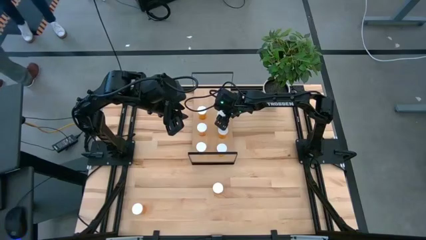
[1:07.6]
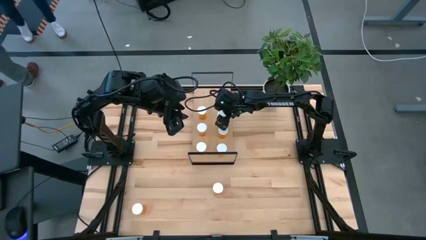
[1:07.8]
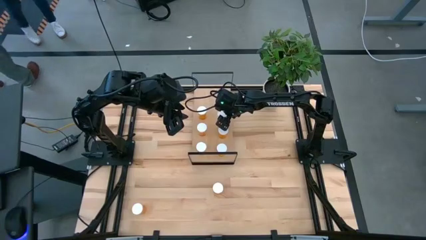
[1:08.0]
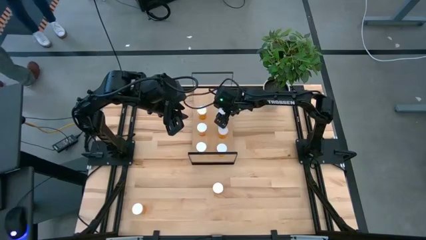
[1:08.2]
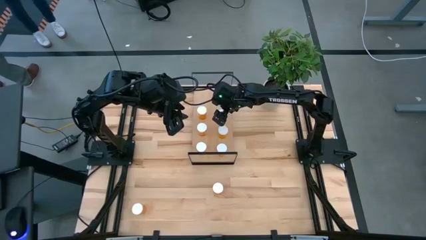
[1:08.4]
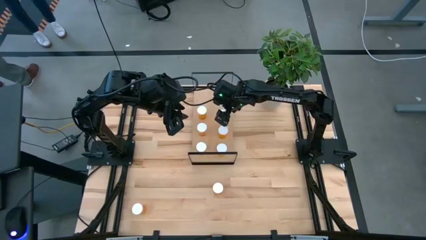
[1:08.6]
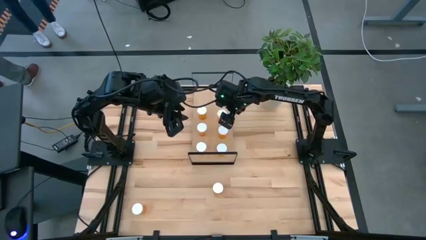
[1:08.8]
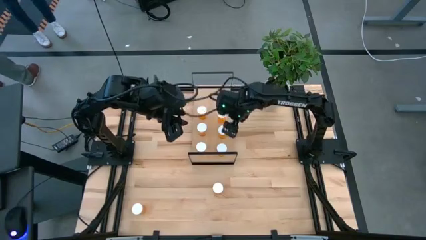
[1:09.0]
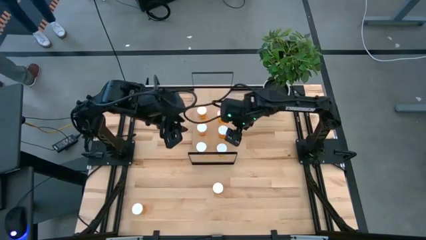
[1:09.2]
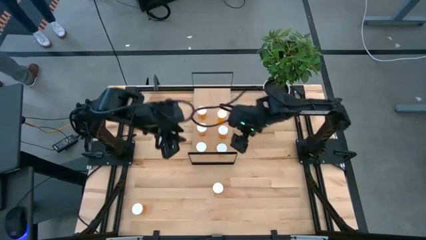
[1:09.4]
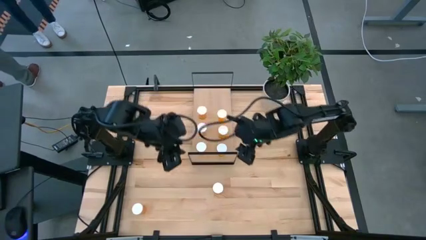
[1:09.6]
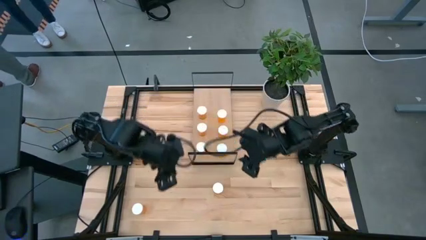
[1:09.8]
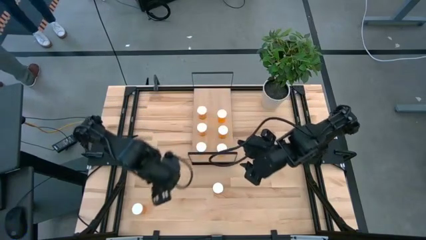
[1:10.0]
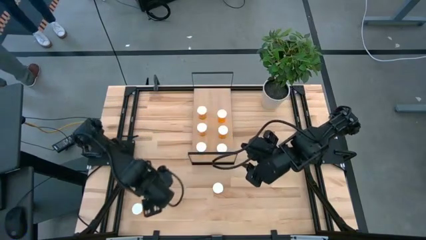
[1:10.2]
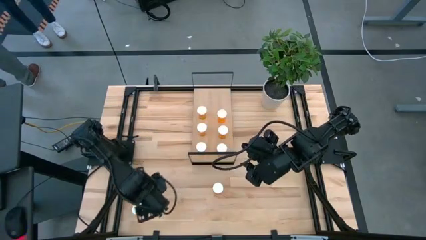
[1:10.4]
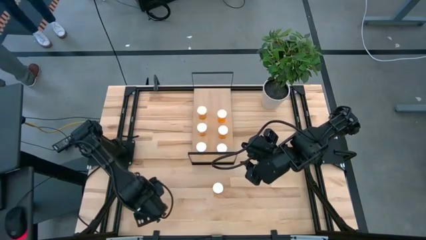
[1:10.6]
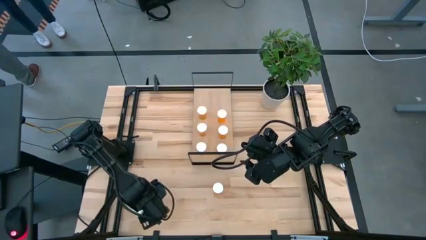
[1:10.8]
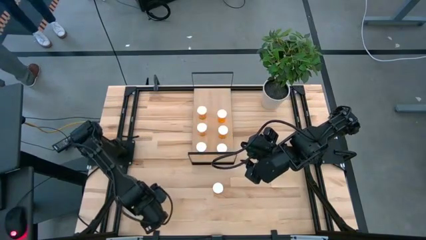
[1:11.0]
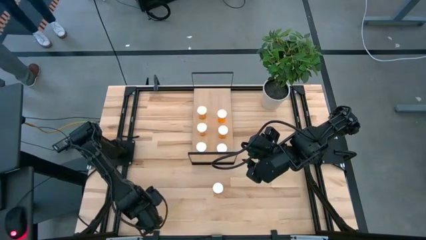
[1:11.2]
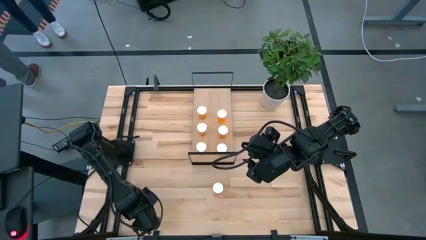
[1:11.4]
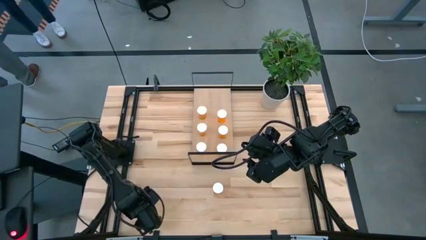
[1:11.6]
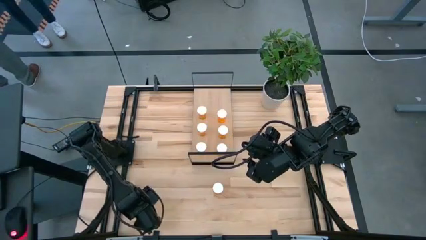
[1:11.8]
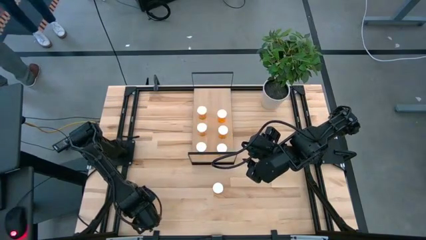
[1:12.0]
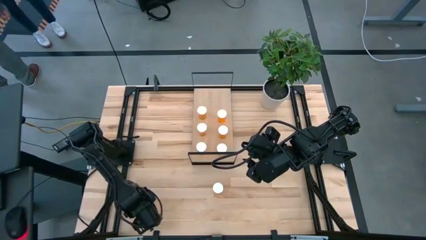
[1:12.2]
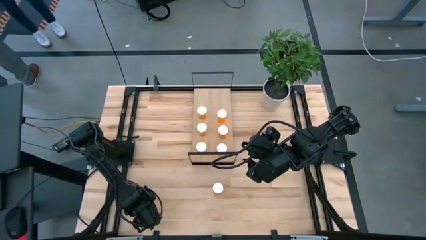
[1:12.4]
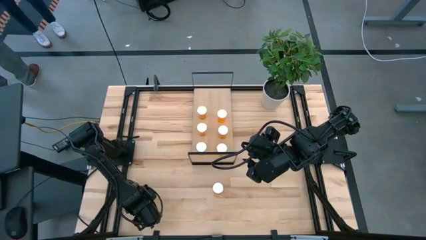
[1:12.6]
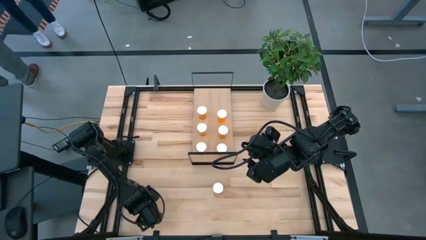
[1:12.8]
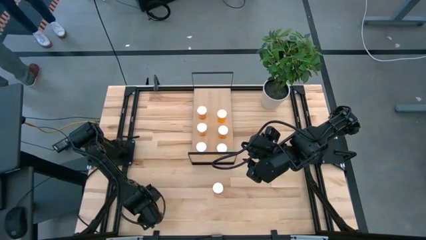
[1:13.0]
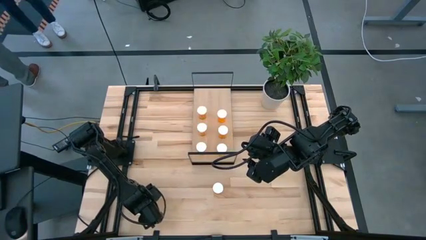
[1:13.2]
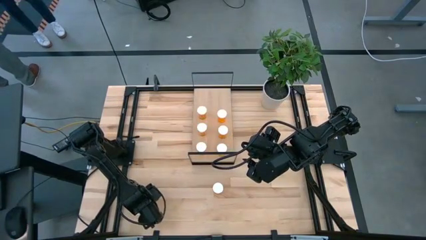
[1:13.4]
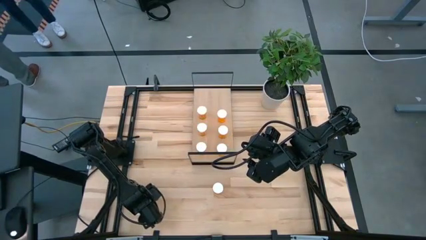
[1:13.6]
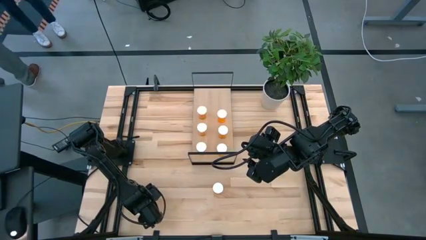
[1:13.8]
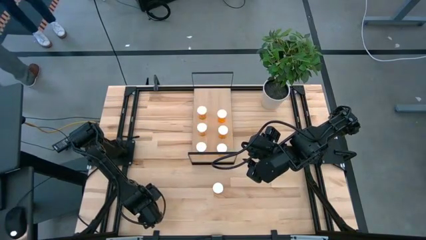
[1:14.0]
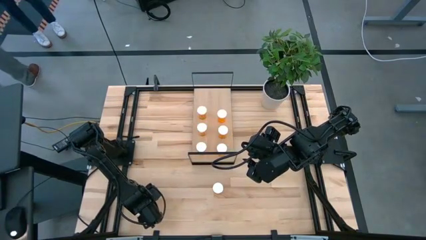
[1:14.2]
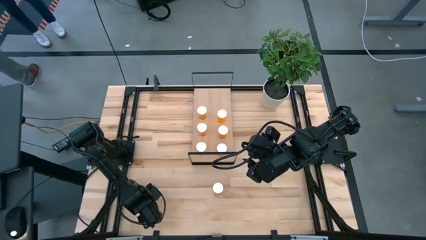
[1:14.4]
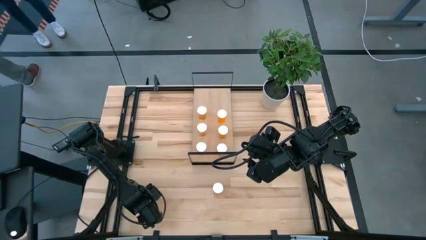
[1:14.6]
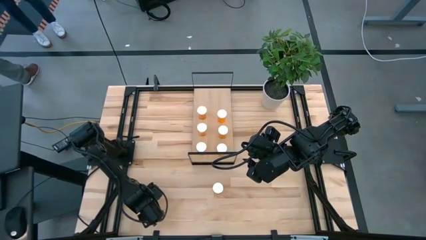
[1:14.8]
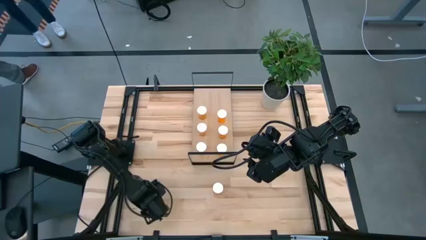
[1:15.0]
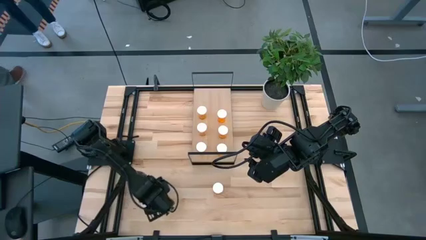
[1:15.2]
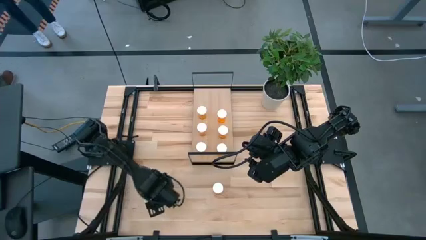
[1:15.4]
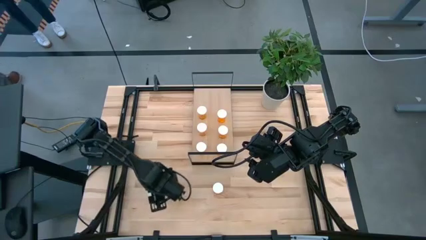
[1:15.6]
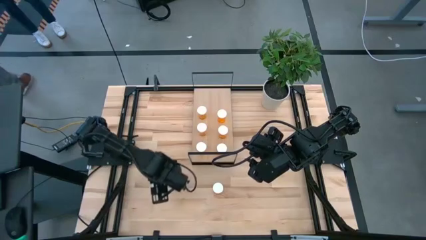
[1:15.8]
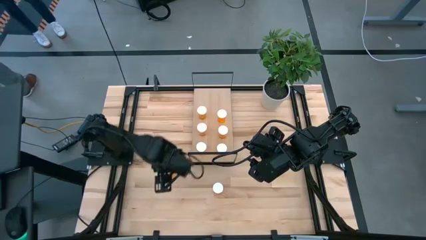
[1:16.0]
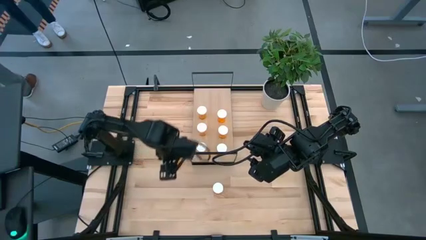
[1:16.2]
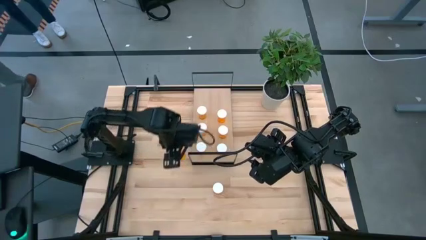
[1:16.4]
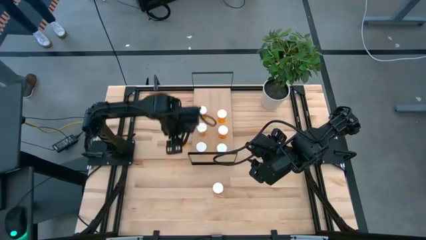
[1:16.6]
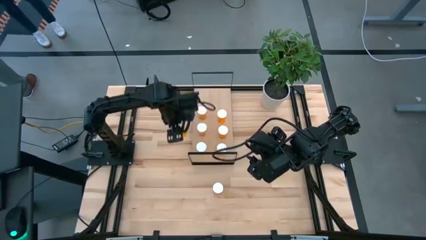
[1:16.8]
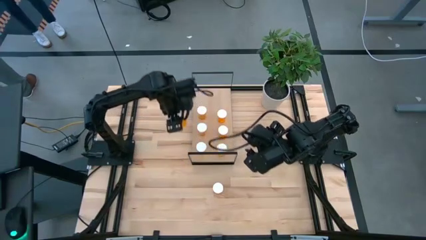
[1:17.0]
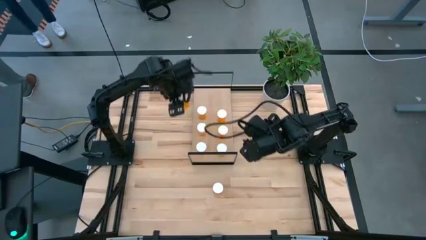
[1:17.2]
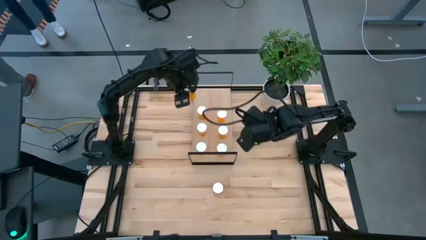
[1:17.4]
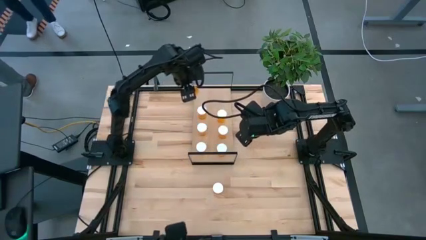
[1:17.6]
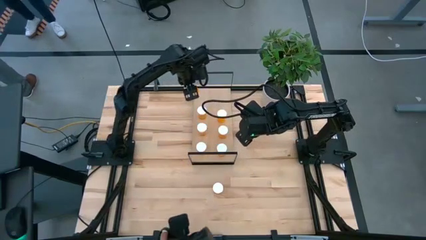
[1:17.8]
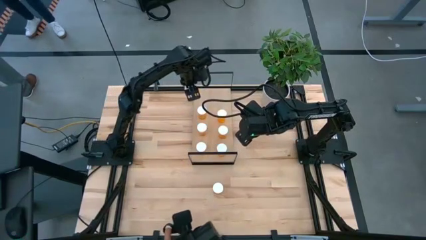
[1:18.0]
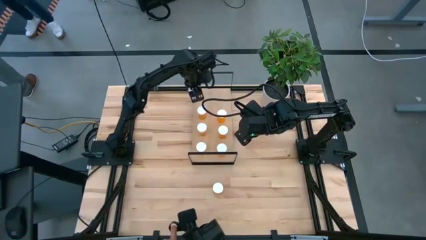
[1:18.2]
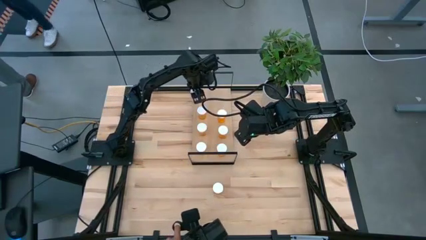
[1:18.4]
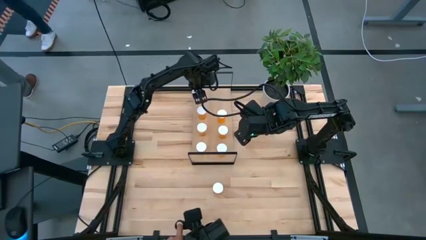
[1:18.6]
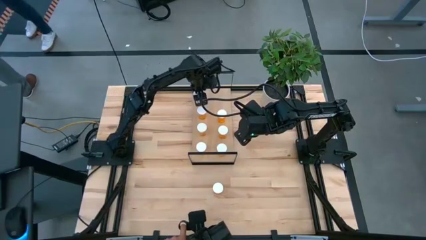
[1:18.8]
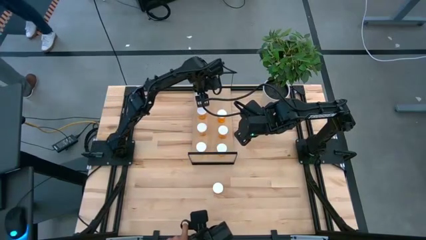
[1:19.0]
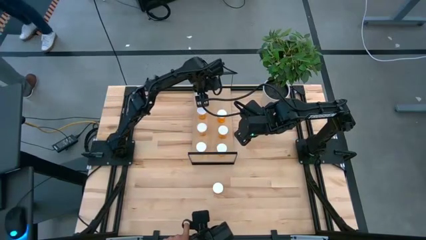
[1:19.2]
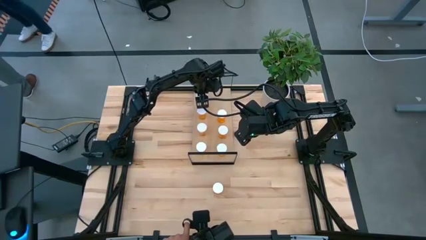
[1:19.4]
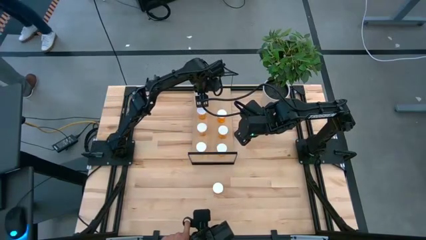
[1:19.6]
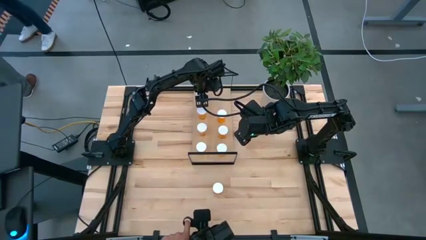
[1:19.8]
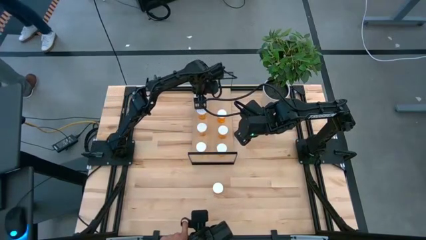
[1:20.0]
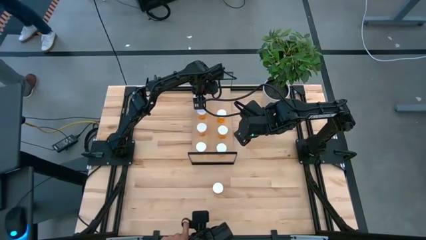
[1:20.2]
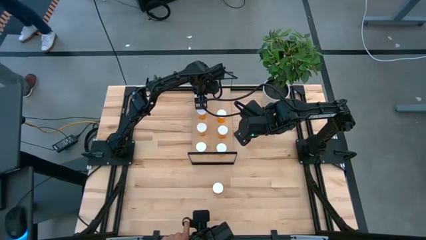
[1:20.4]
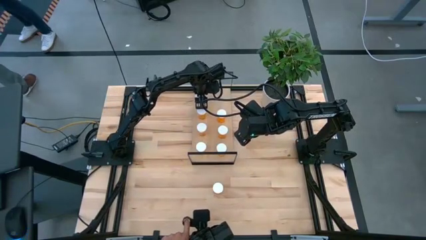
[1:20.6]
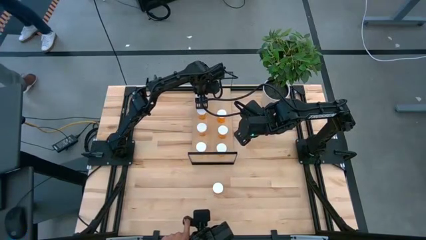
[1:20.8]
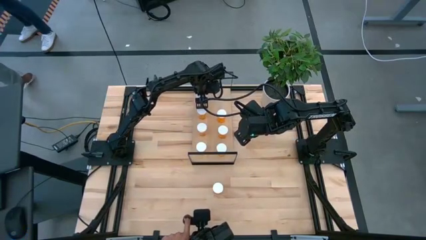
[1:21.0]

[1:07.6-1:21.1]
Task: Pick and place medicine bottles onto shelf by color
Put the orange pill bottle on the shelf aligned with the other orange pill bottles

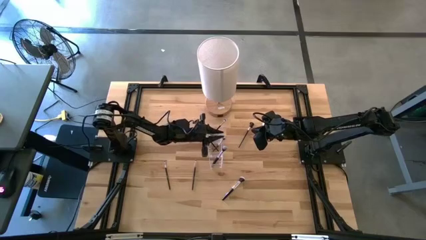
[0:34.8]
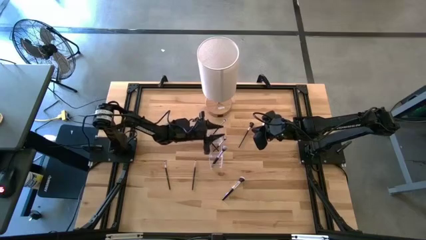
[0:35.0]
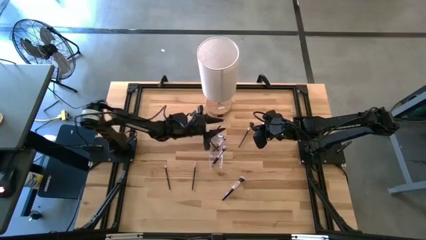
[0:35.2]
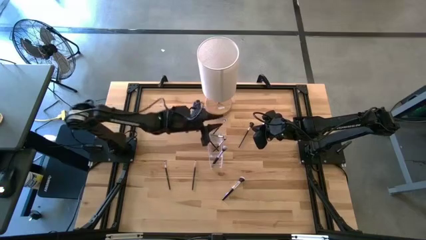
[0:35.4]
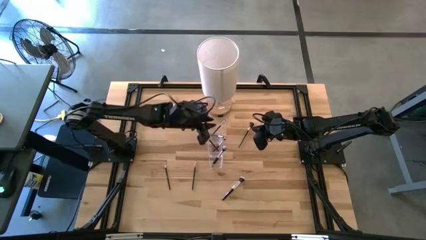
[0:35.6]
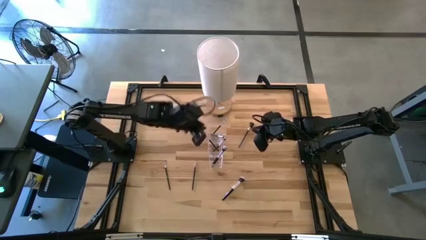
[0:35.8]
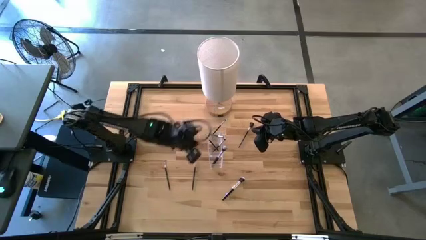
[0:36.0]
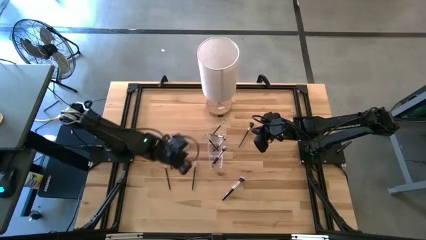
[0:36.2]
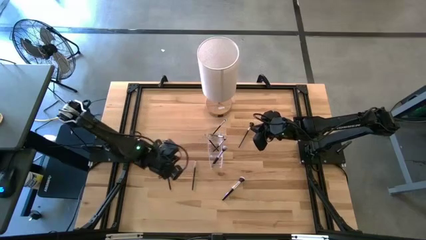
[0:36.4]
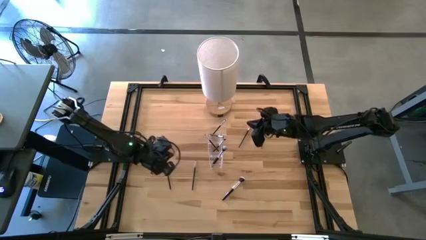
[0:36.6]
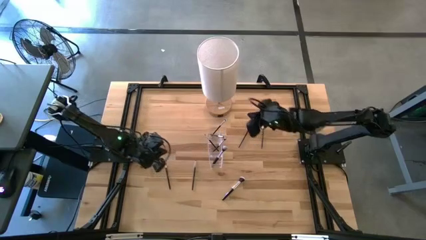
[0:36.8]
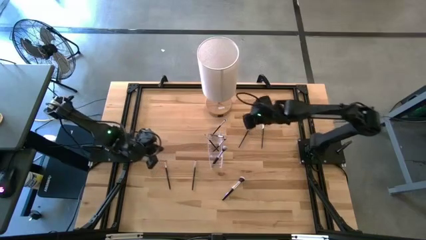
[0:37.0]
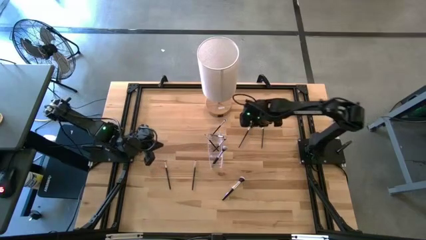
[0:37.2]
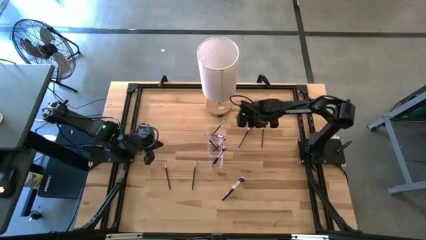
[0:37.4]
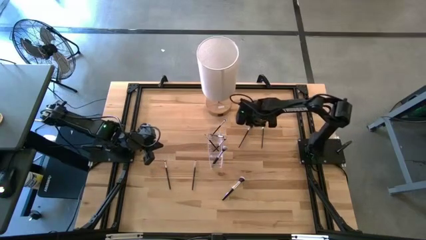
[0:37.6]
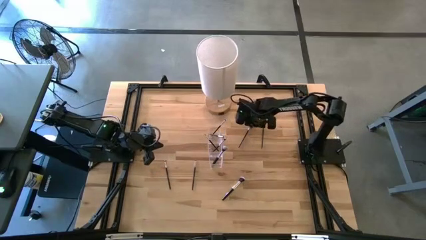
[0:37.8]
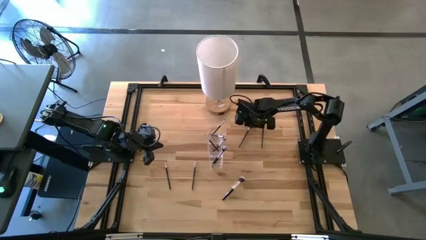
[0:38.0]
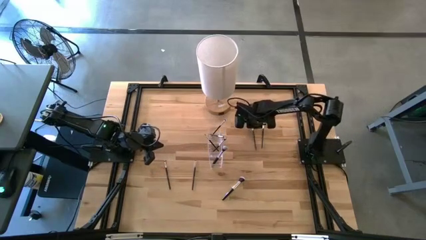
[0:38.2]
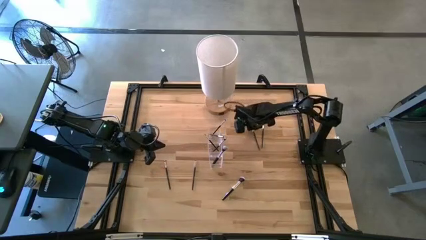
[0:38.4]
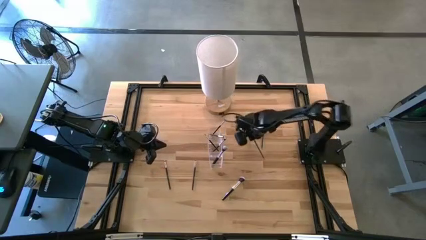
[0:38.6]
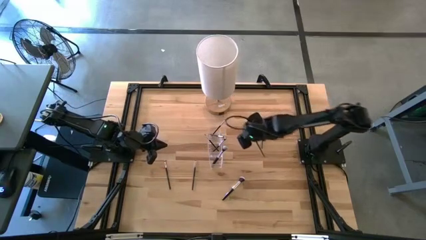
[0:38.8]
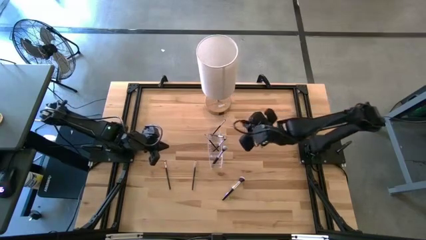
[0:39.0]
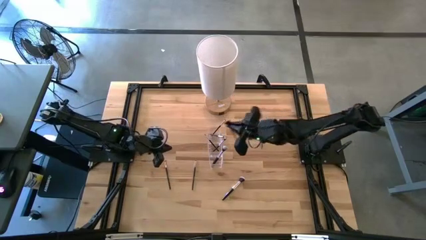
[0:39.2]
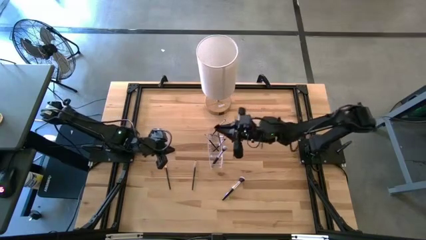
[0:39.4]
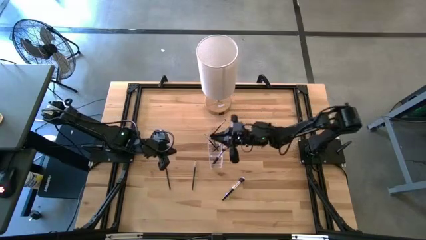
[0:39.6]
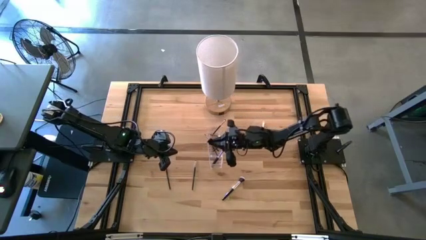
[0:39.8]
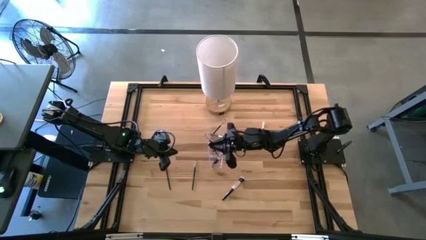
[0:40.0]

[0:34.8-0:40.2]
Task: Put items in baskets/containers
Put the black brow brush into the transparent organizer
